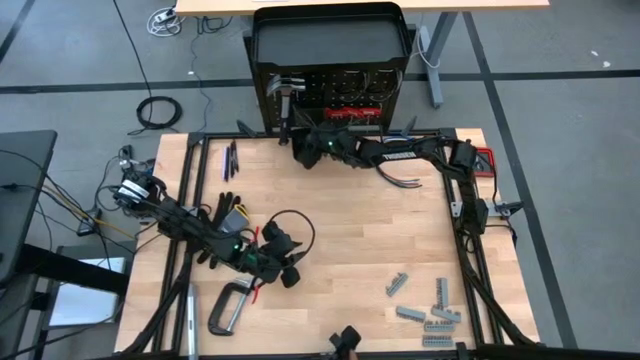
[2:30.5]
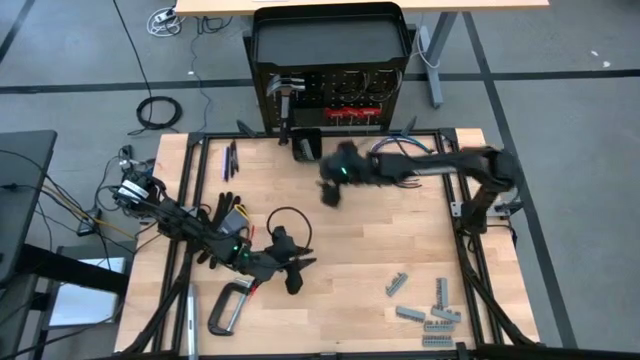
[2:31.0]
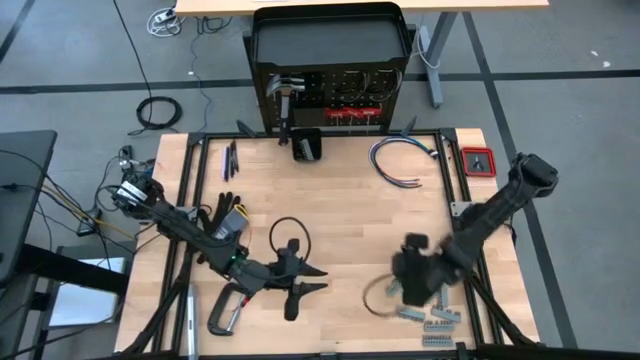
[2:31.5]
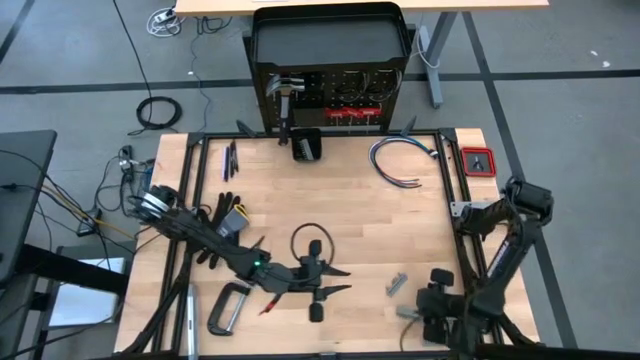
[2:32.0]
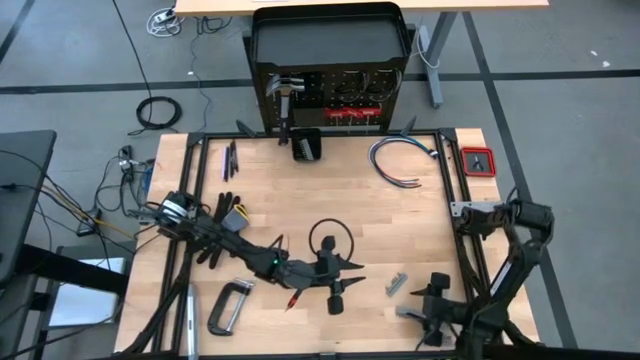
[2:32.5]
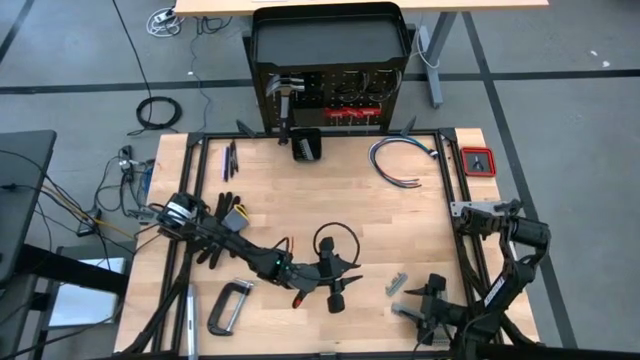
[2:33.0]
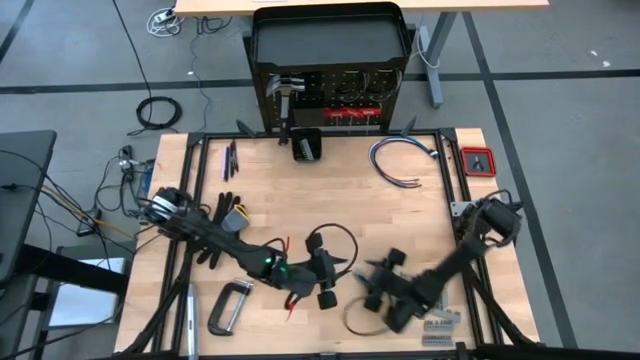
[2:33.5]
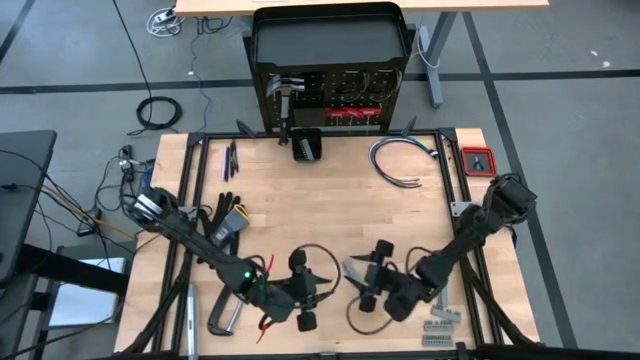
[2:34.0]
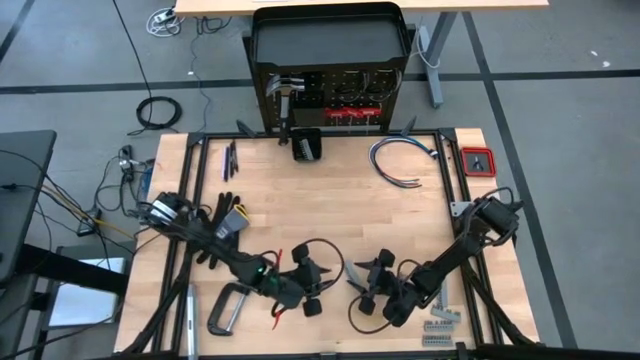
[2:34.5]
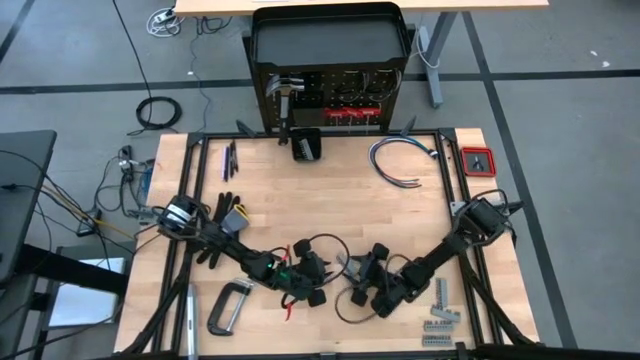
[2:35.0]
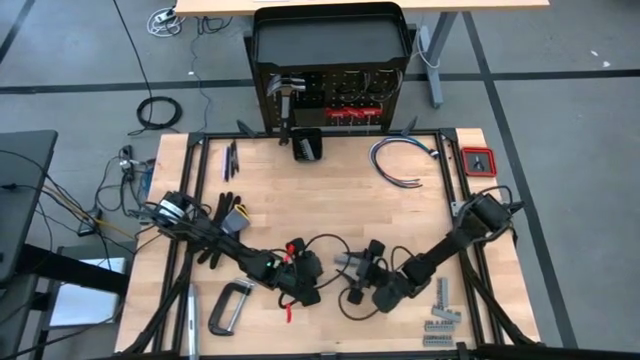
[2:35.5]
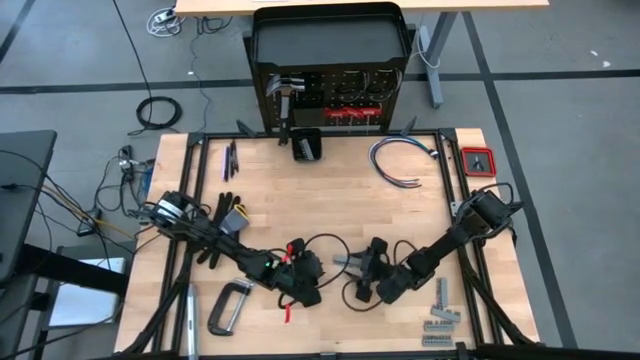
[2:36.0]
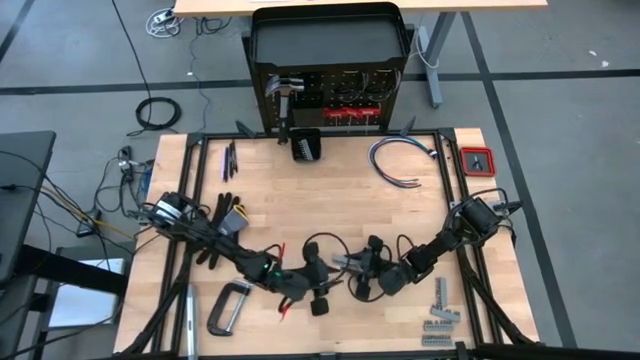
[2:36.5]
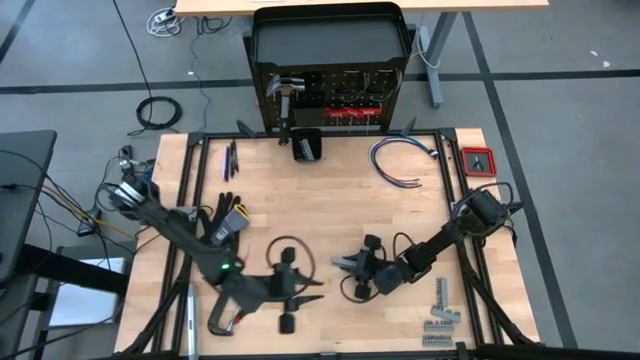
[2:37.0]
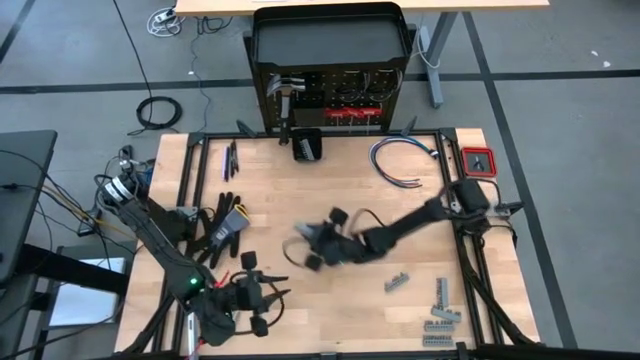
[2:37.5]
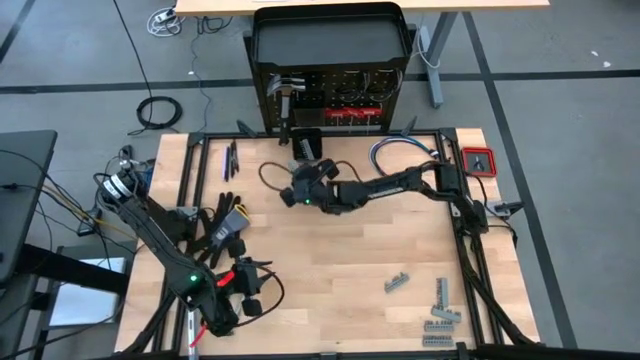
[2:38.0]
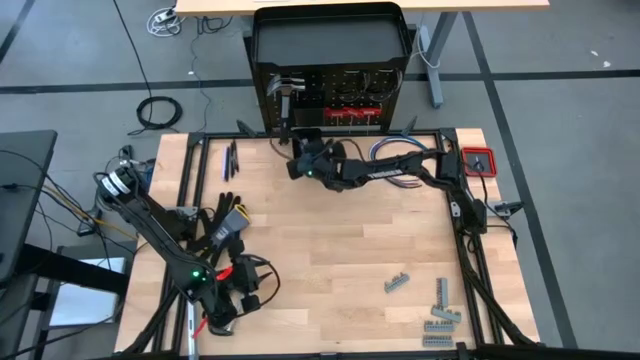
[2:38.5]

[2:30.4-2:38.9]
Task: Hang tools onto peg board
Put the gray terminal block into the black bin

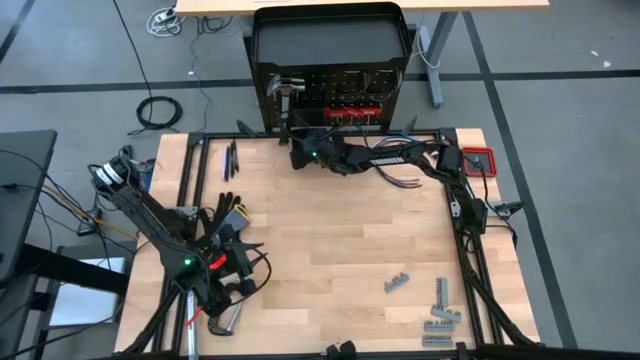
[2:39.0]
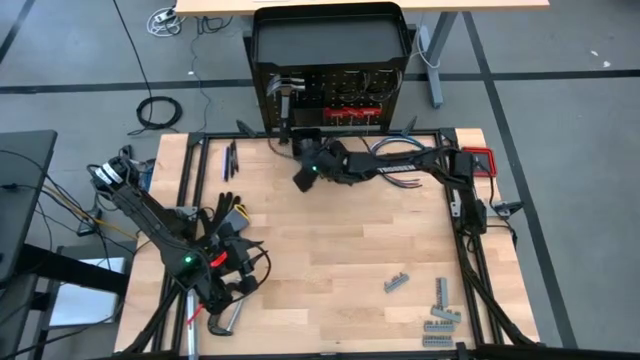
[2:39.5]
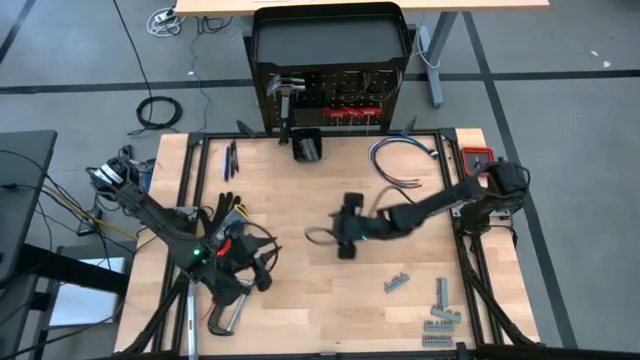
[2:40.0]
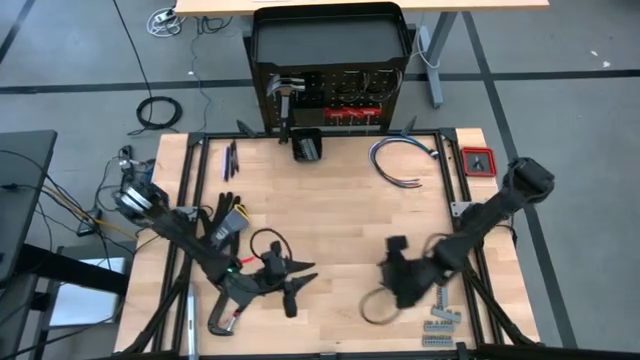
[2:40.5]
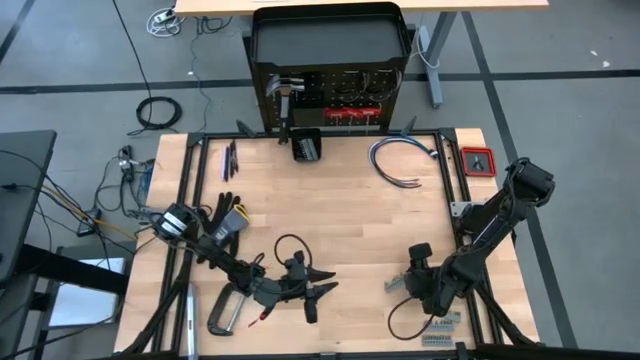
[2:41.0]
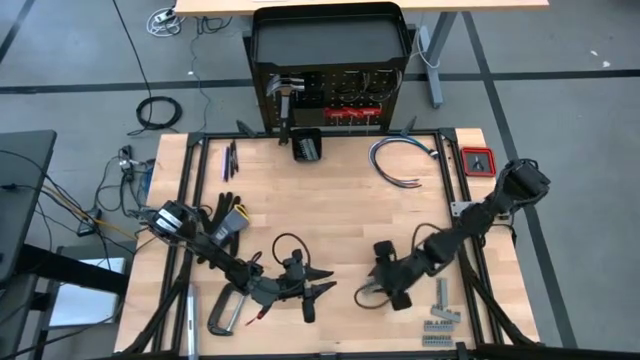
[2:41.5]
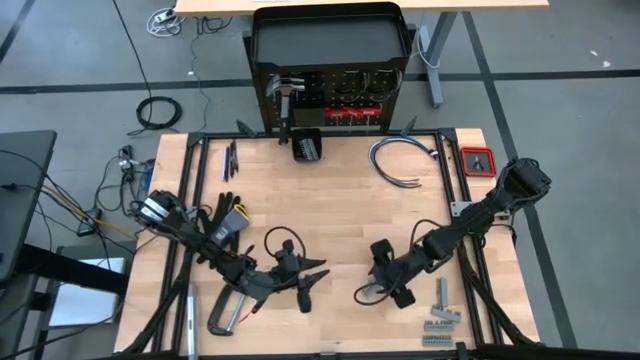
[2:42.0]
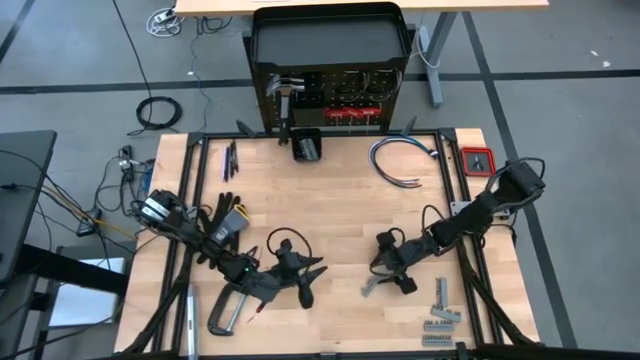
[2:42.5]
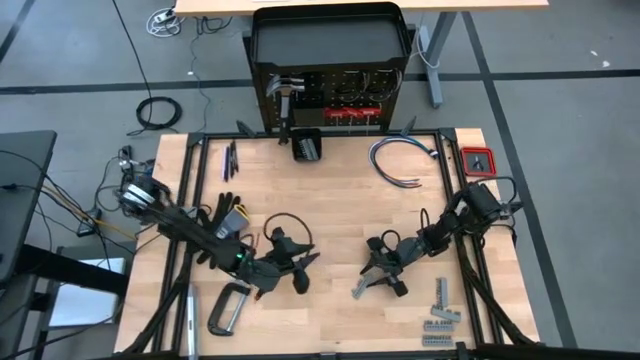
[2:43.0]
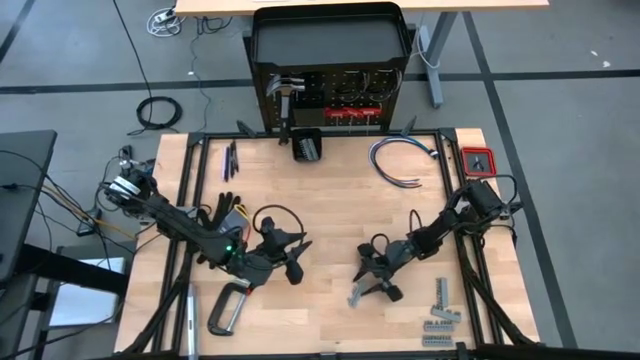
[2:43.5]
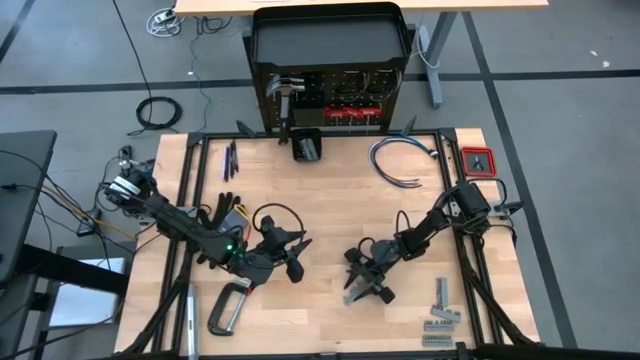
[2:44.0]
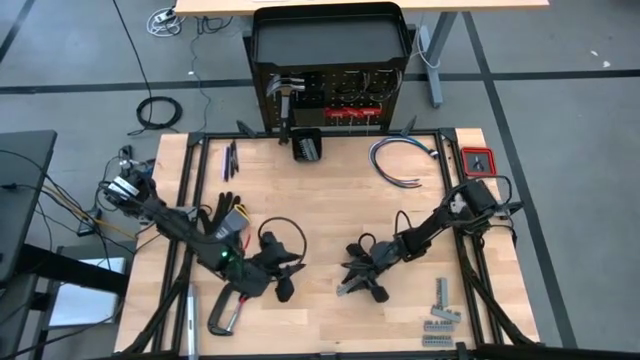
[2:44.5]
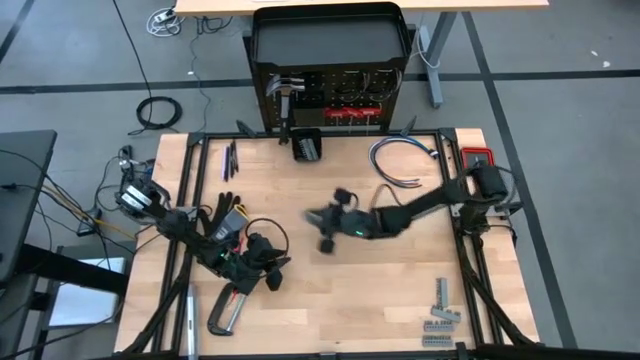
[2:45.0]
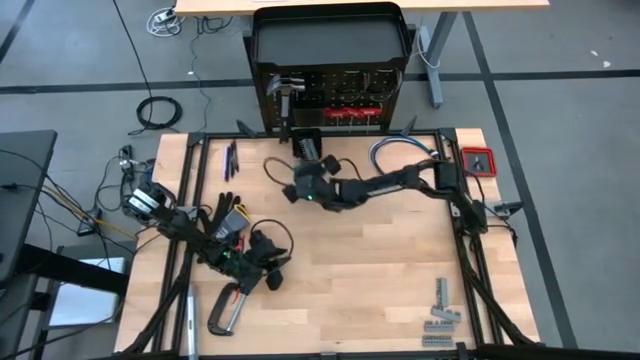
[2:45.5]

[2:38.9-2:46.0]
Put the gray terminal block into the black bin

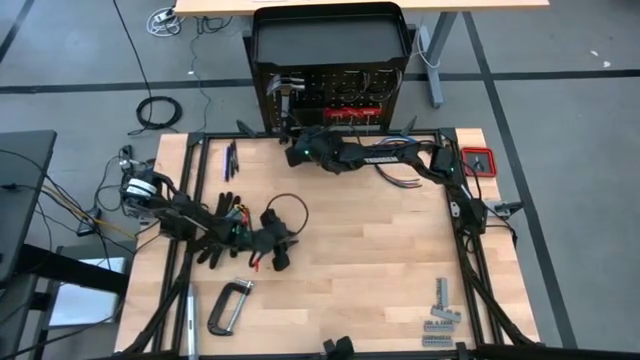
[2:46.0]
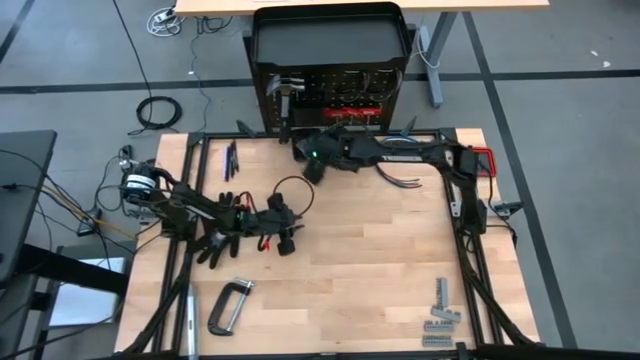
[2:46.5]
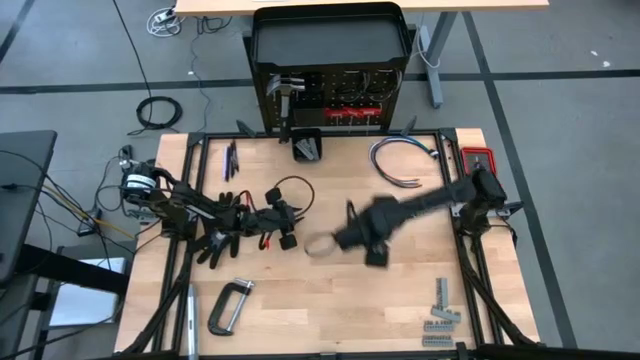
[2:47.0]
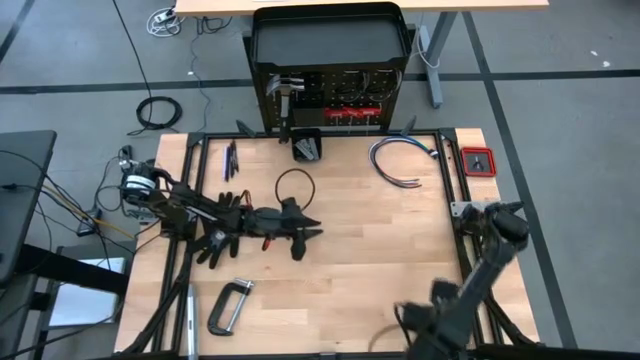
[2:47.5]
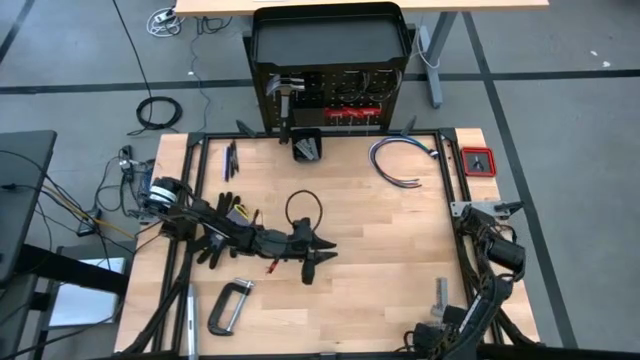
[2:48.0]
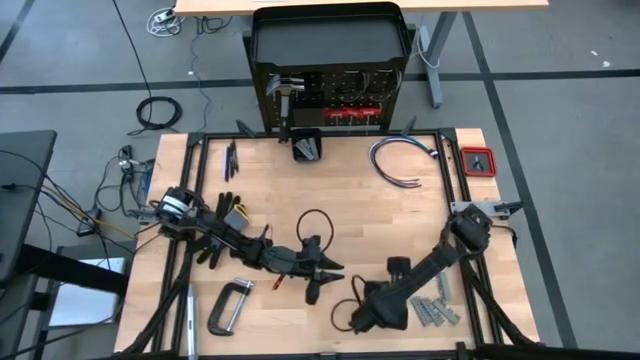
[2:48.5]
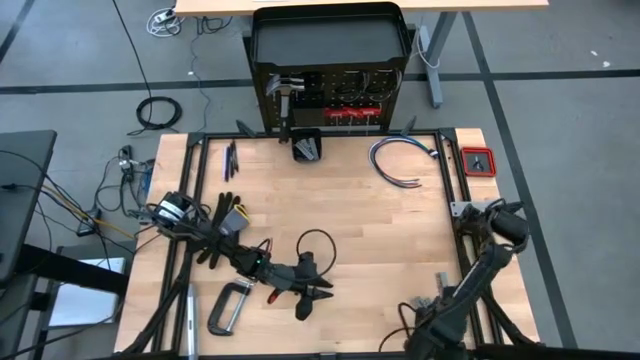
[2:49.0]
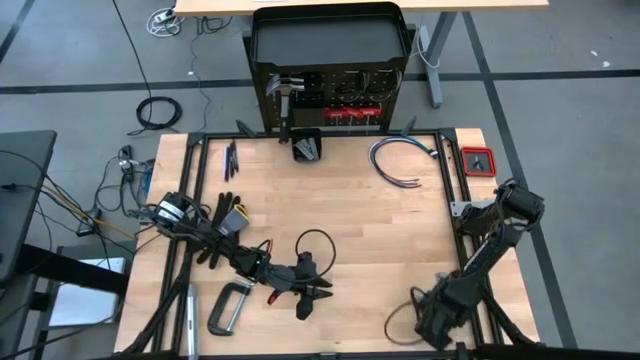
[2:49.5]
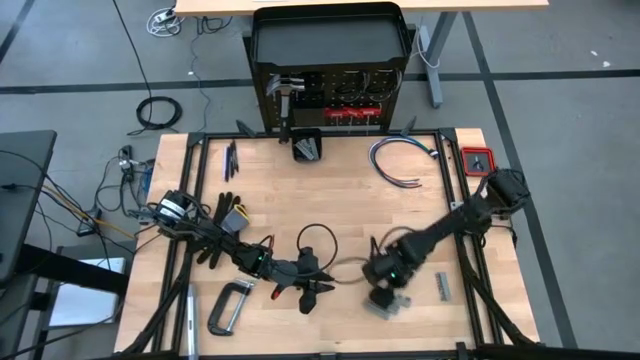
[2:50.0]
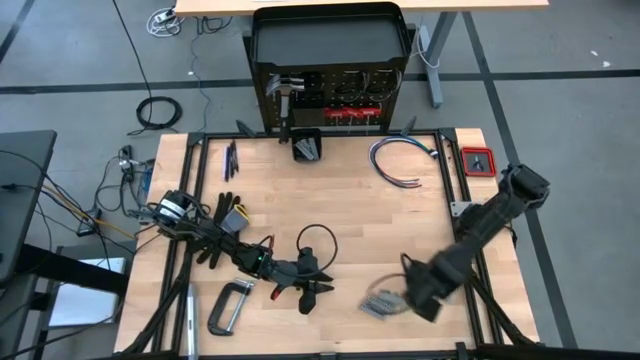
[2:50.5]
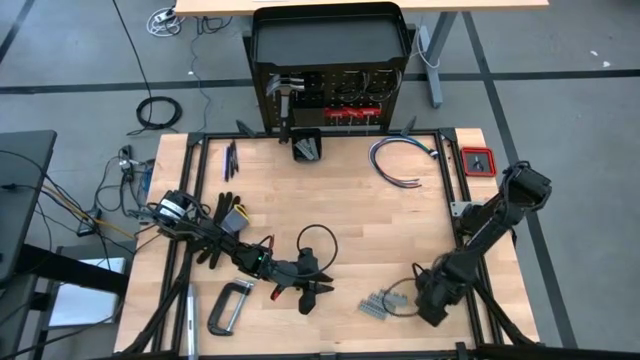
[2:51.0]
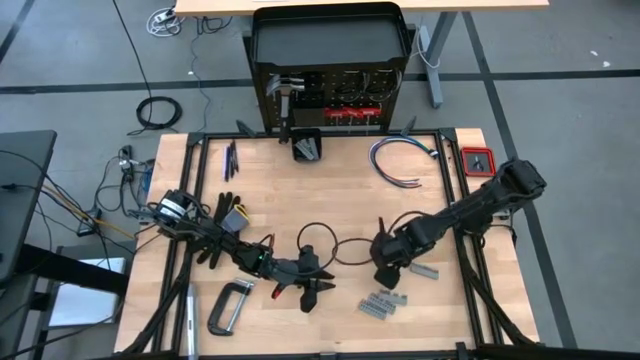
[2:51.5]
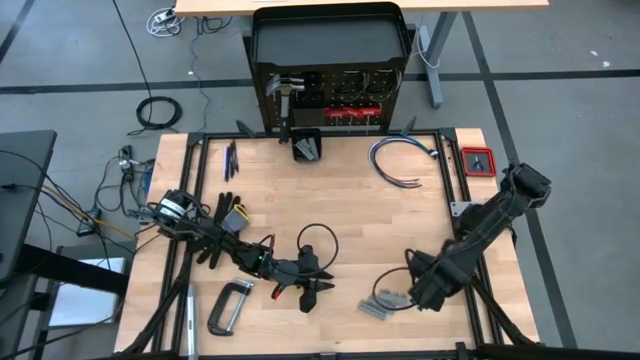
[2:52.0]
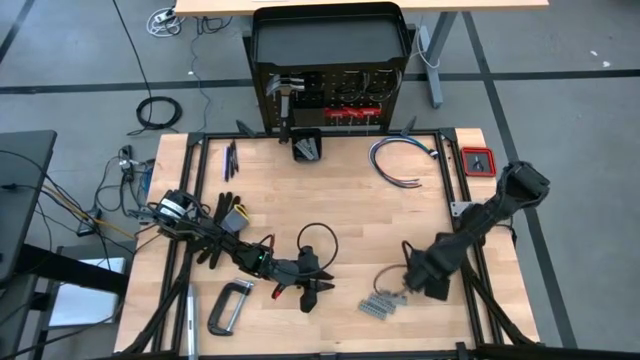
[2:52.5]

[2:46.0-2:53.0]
Adjust the gray terminal blocks
